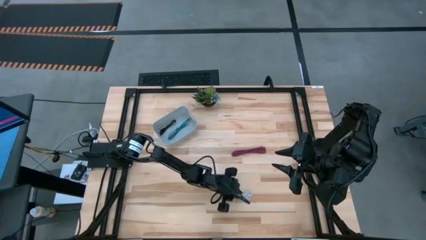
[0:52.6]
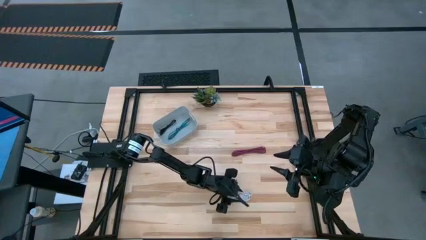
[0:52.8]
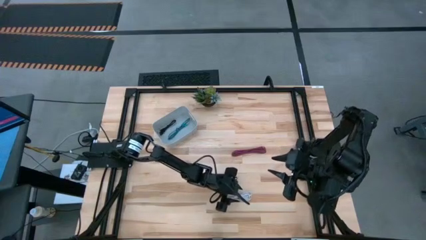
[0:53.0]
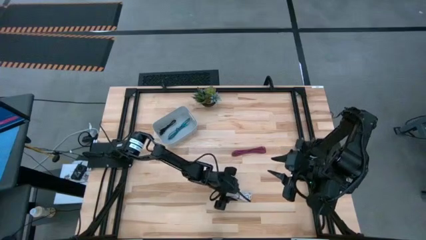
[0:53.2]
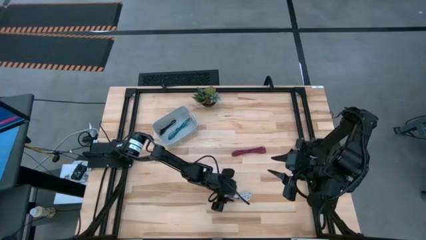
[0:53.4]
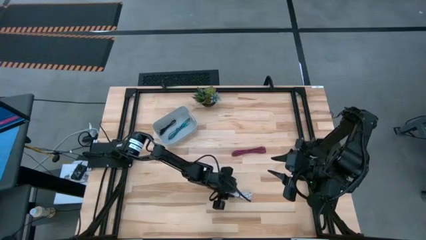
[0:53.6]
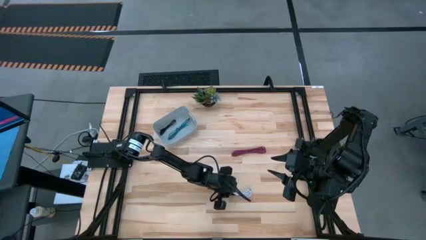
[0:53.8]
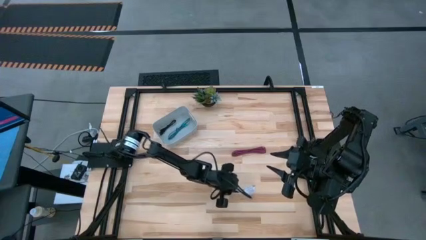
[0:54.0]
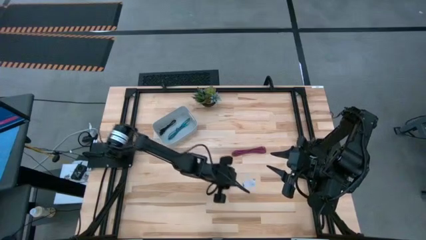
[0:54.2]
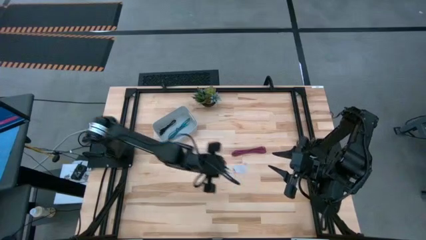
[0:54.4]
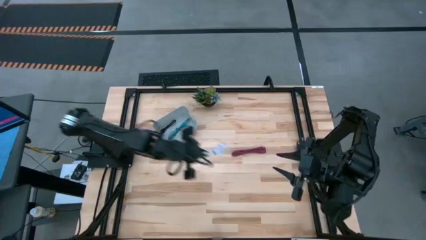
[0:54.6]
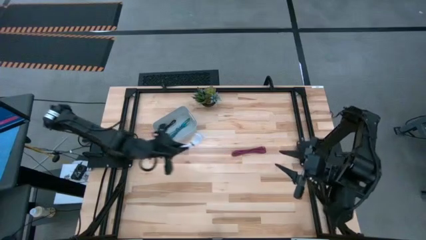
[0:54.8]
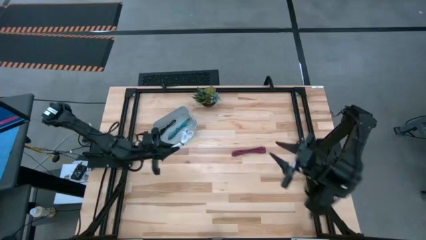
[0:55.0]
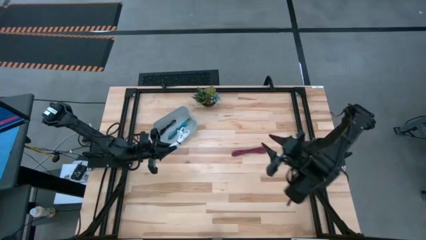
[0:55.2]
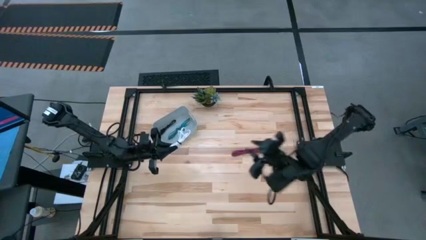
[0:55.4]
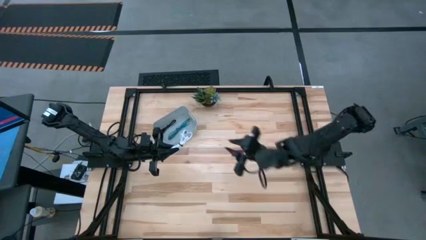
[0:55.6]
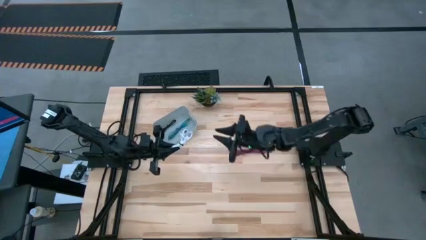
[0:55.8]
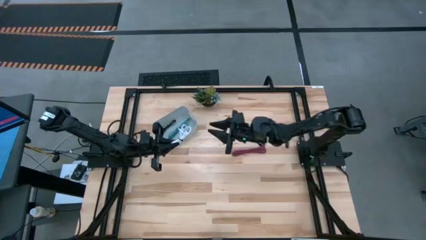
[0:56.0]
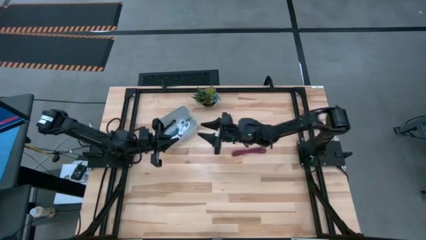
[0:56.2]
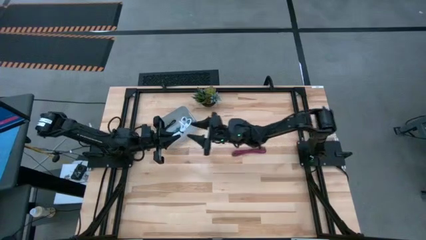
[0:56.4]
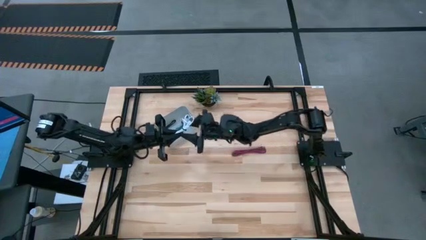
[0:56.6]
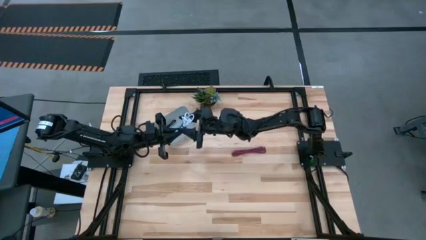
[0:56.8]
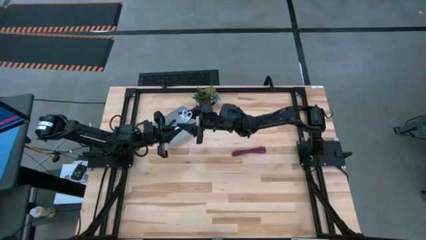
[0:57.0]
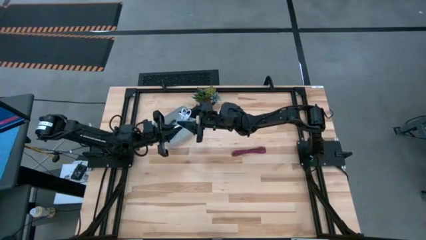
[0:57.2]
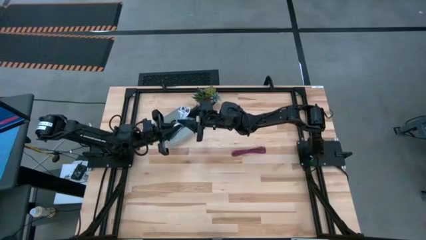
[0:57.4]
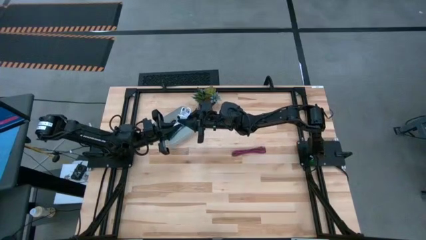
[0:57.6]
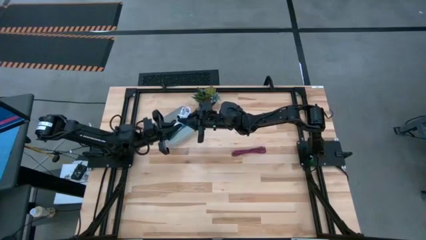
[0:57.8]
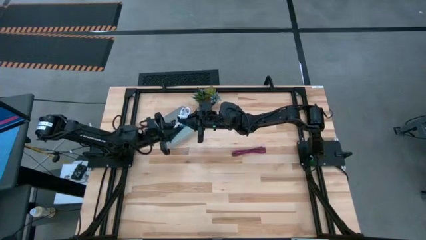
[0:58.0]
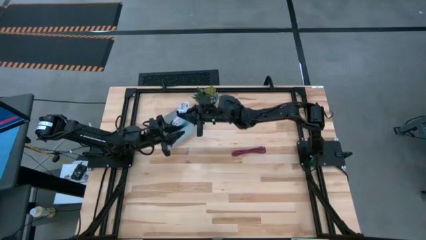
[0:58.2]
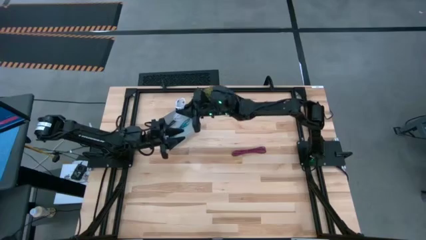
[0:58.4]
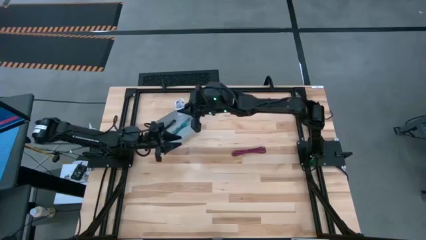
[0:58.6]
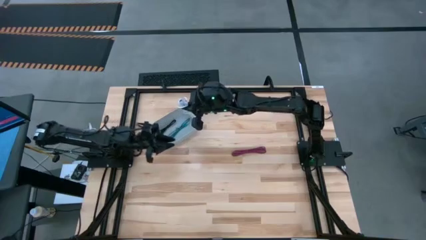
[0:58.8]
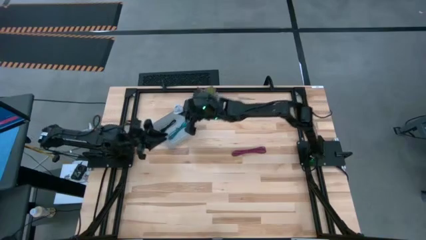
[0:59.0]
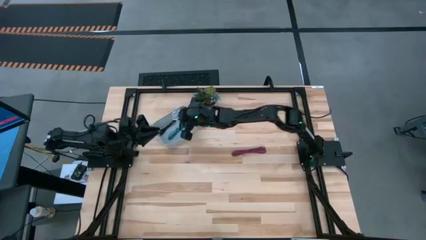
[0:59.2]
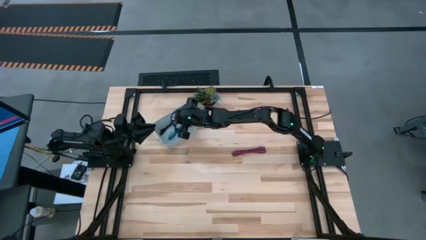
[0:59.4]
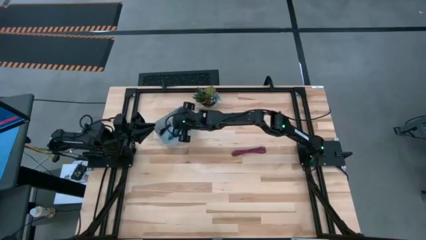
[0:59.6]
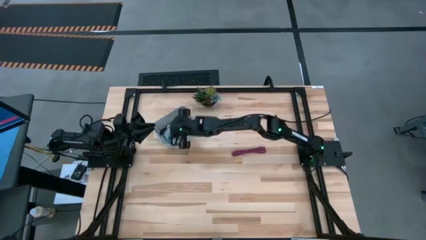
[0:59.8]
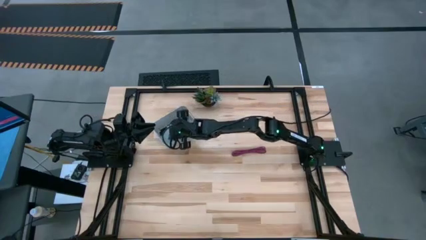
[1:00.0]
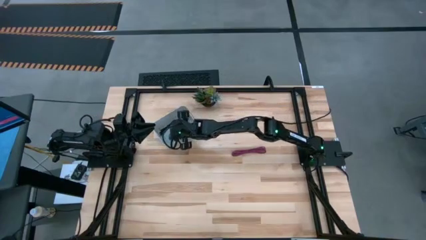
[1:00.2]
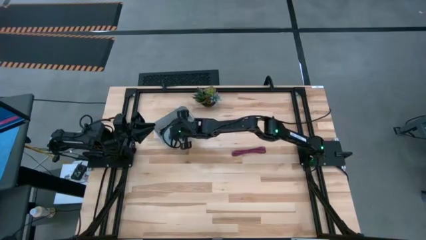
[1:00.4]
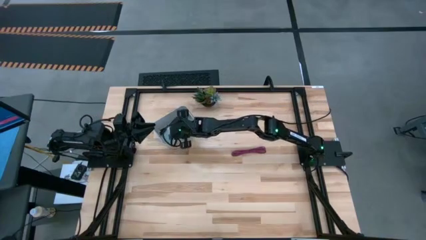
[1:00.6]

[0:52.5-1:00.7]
Task: Pick and place USB-C Cables
Put the white charger cable into the white bin

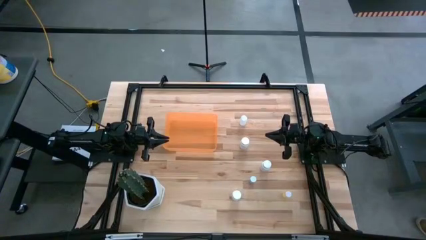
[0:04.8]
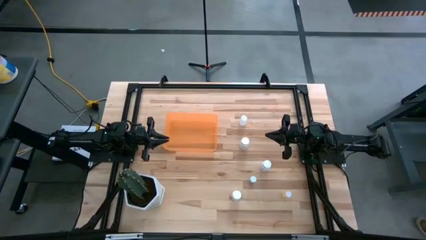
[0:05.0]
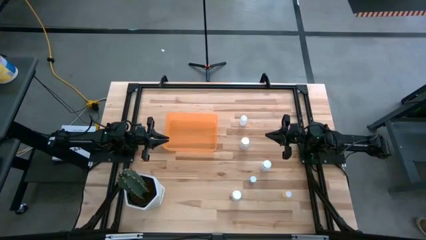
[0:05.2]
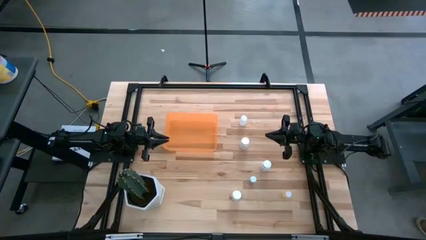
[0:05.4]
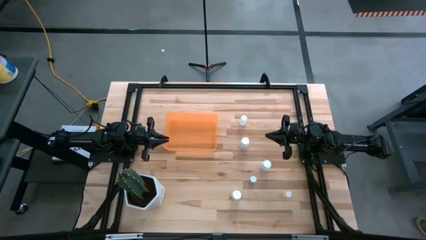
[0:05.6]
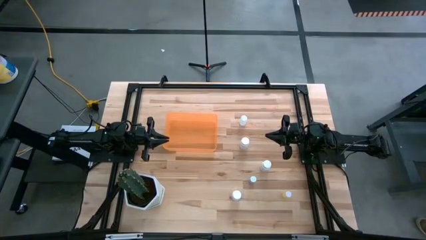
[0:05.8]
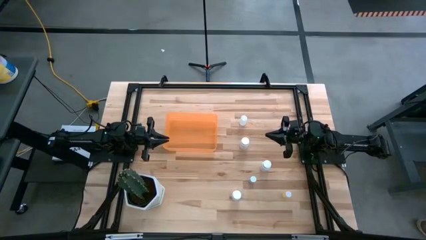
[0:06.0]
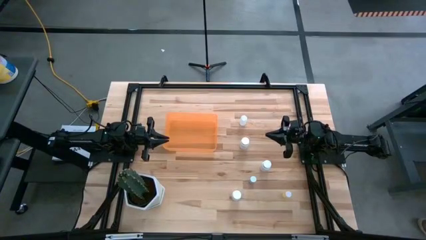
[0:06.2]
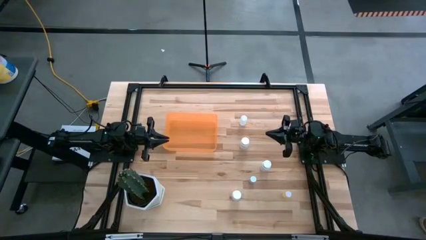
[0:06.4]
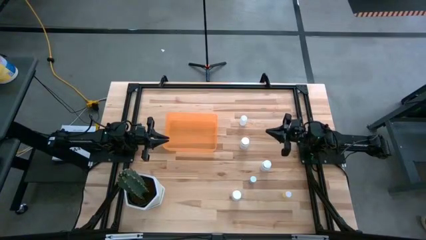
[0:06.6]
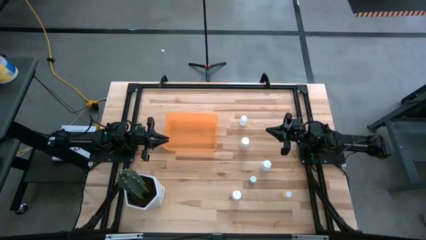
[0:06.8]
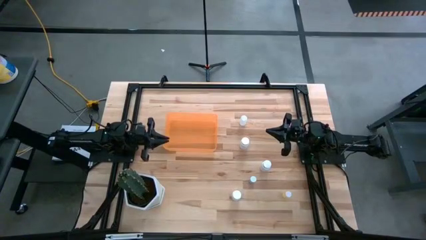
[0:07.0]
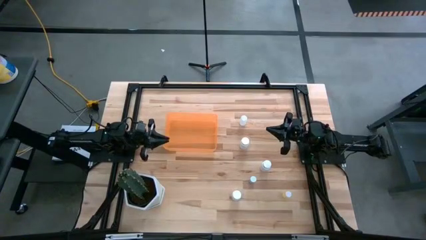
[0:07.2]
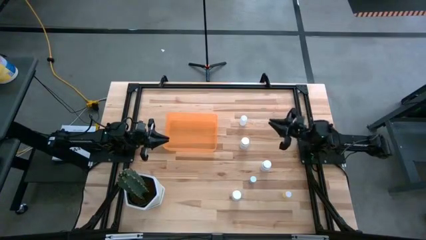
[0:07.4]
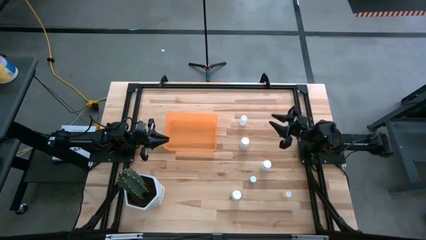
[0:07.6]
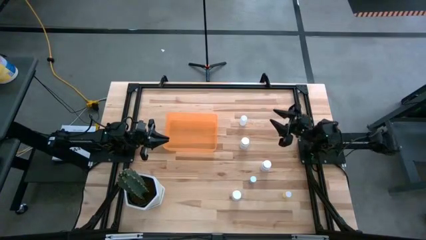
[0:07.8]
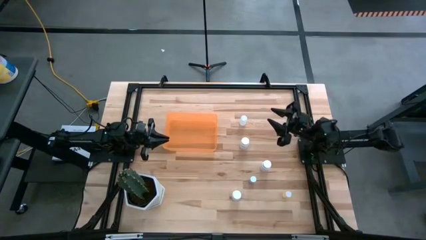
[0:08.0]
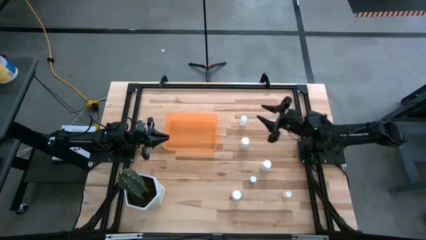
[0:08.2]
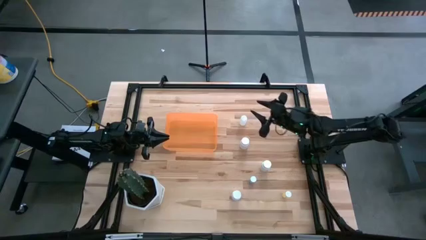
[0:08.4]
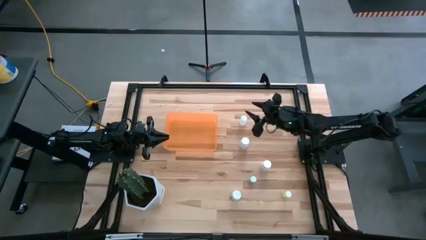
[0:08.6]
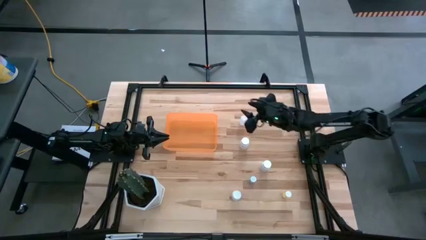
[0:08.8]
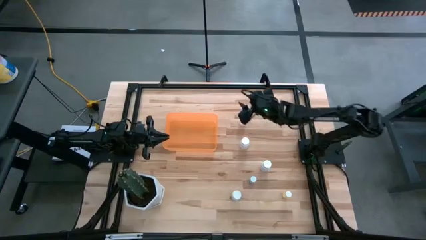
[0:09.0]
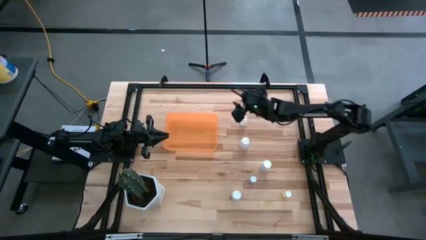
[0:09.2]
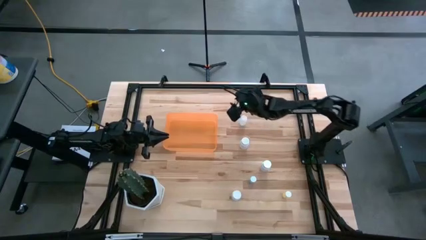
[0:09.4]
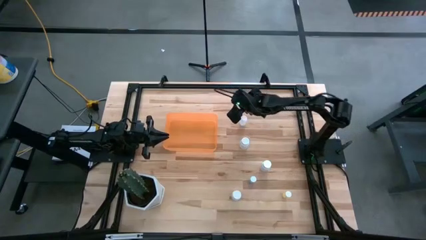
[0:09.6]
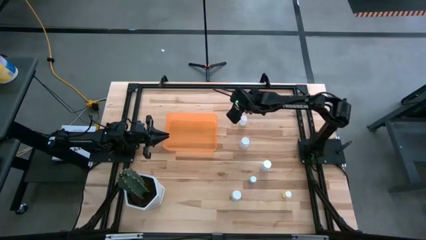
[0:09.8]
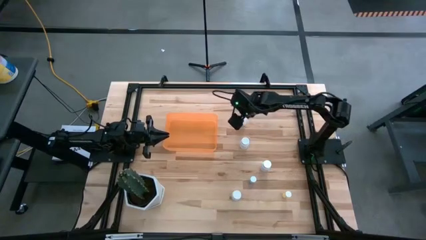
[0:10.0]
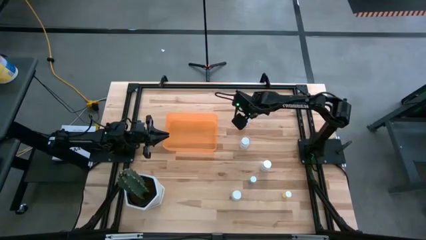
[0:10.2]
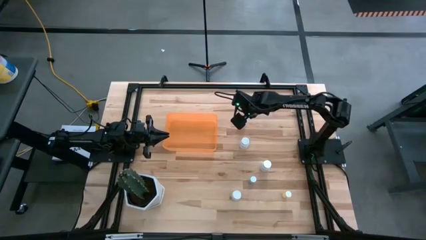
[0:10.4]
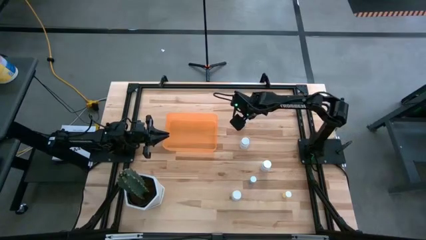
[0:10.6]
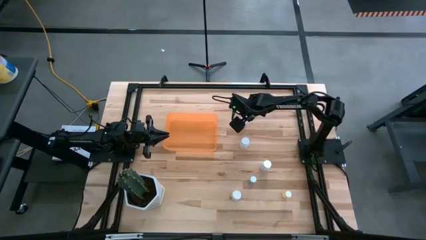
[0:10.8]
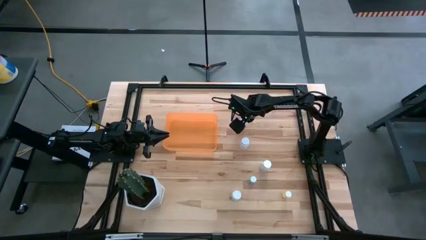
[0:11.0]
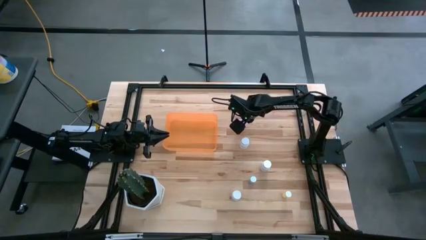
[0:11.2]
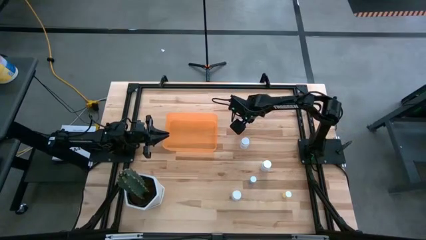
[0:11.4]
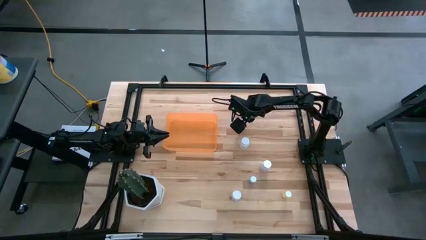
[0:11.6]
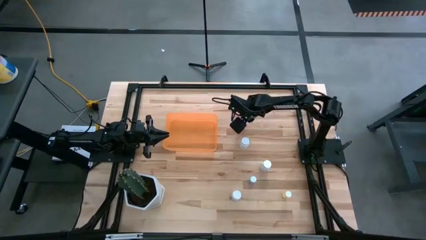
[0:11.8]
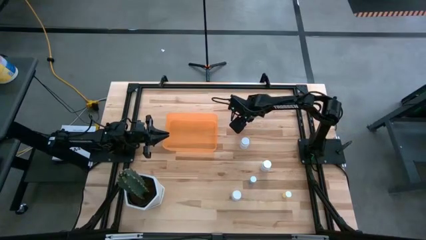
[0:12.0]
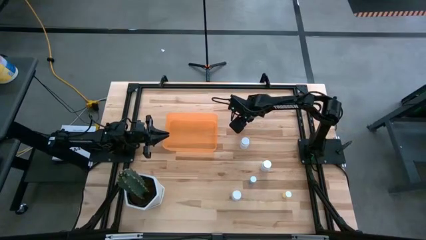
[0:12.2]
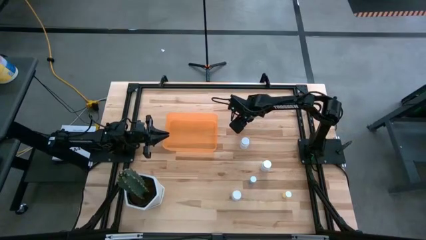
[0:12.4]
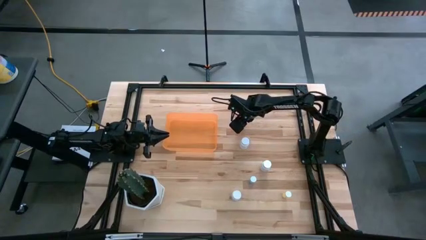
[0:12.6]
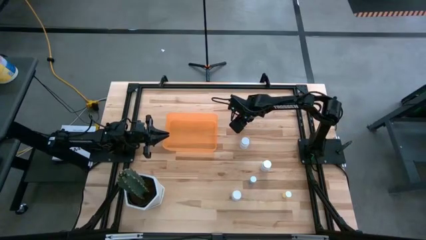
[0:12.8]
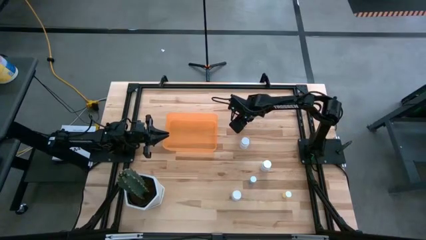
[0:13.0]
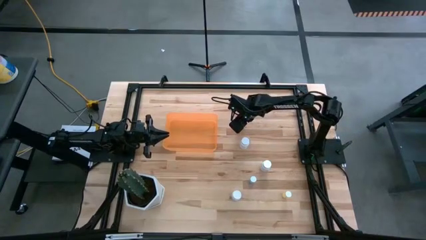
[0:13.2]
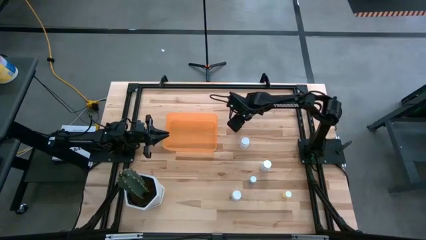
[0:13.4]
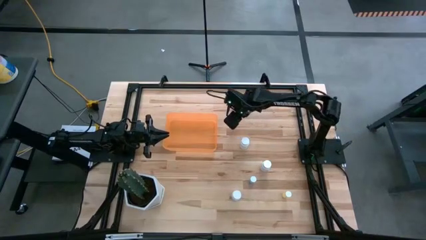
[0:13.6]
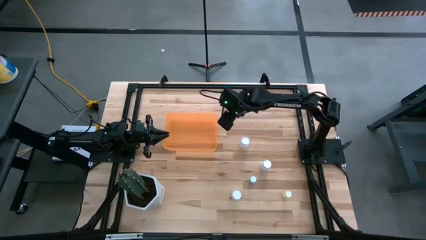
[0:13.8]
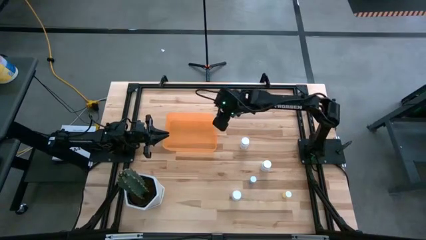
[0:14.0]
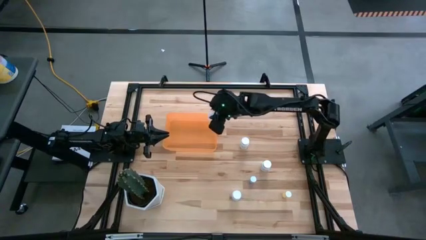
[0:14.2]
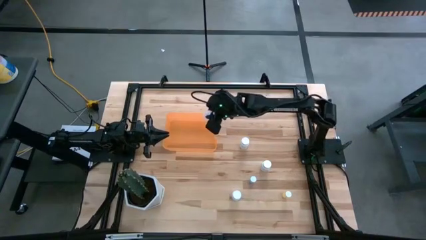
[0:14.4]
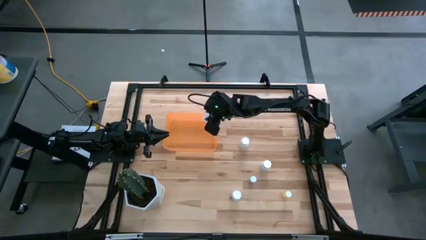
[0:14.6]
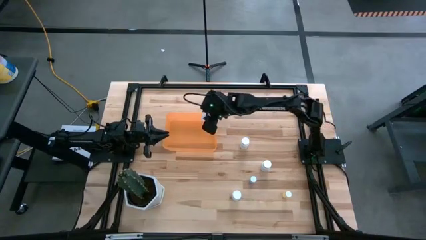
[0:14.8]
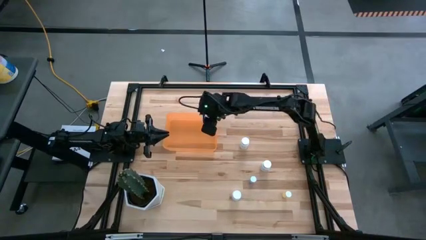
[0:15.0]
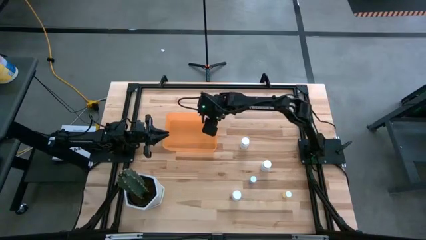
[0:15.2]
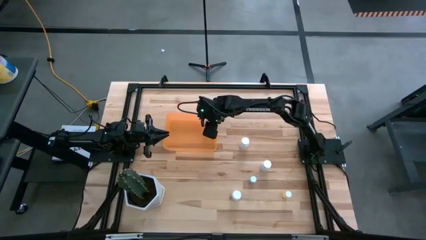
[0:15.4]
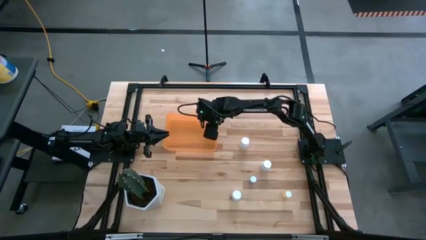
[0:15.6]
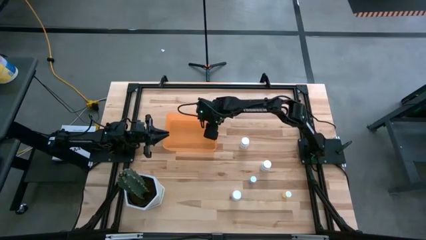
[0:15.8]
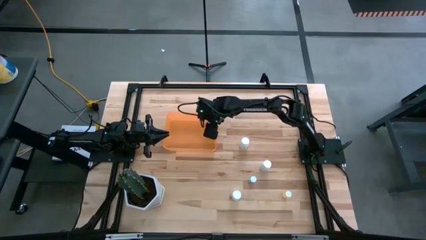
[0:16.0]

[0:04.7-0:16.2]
Task: Pick and place pill bottles into a basket
Put the transparent pill bottle in the orange bin
